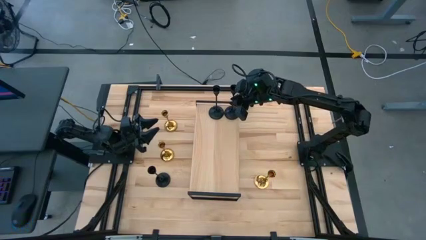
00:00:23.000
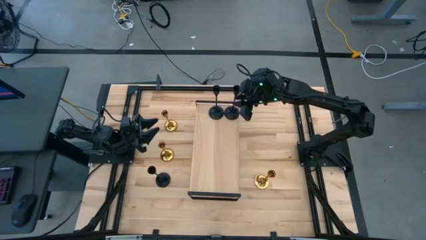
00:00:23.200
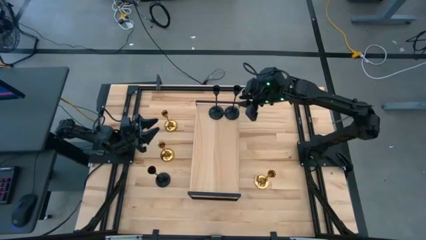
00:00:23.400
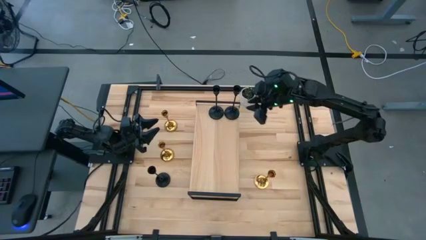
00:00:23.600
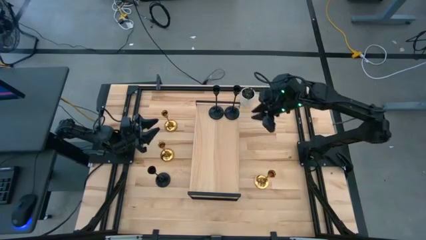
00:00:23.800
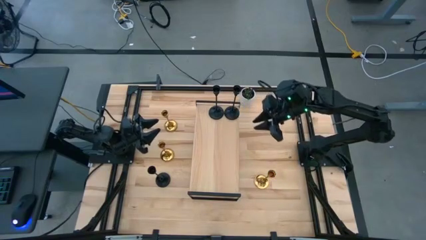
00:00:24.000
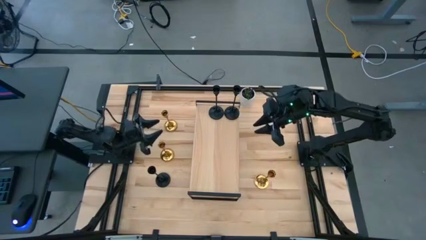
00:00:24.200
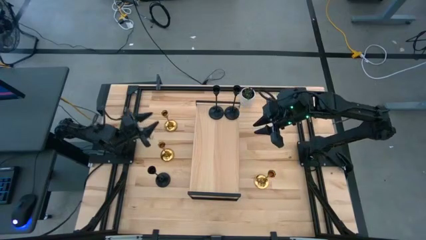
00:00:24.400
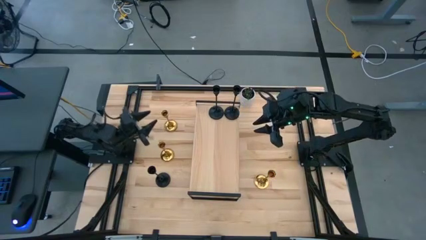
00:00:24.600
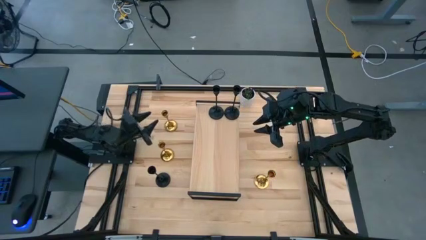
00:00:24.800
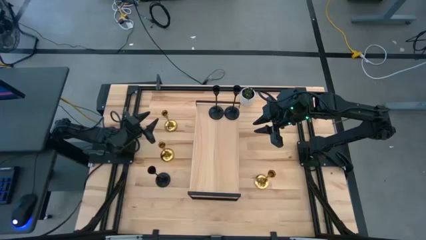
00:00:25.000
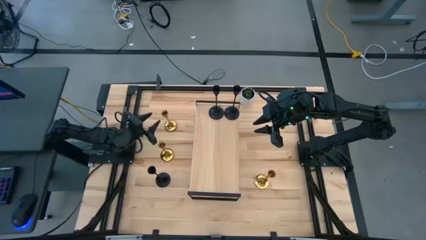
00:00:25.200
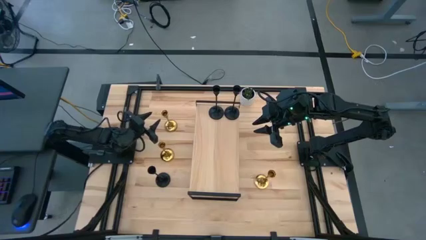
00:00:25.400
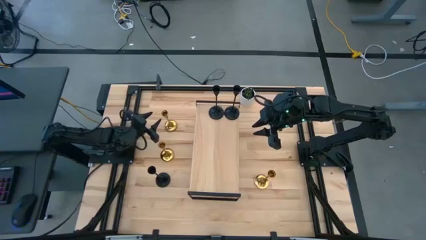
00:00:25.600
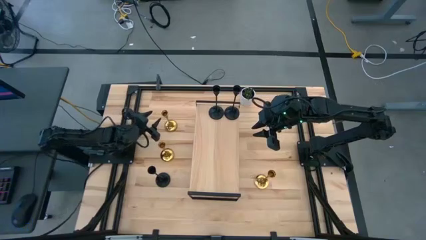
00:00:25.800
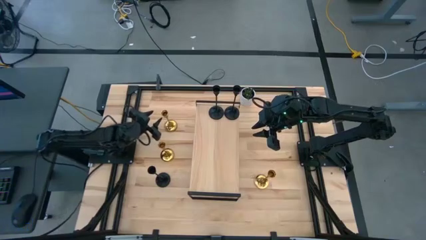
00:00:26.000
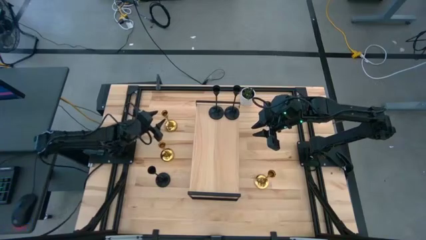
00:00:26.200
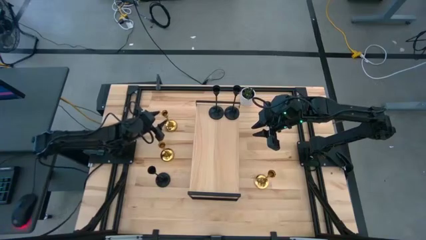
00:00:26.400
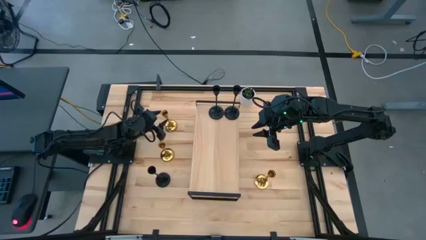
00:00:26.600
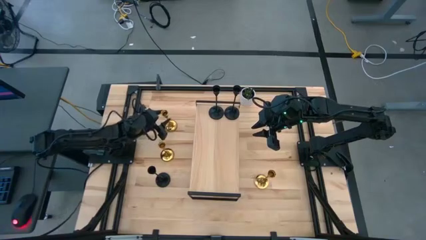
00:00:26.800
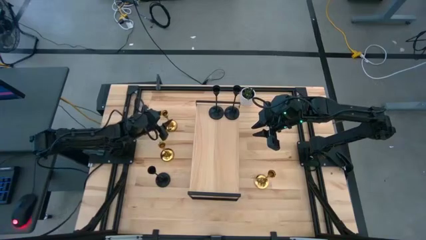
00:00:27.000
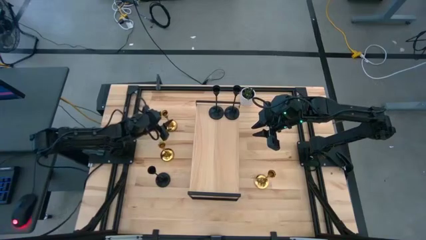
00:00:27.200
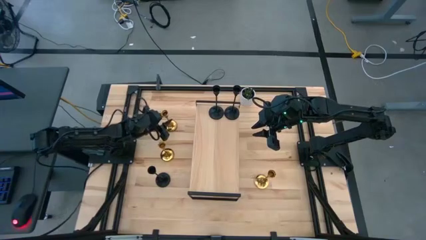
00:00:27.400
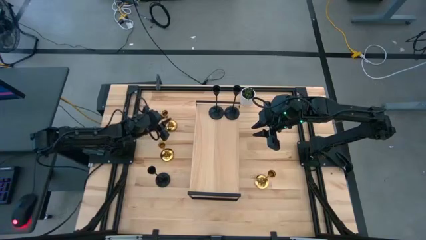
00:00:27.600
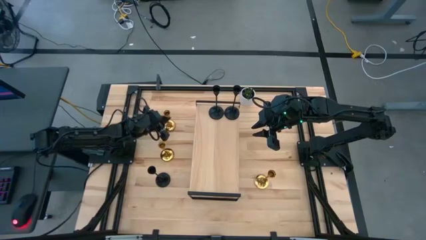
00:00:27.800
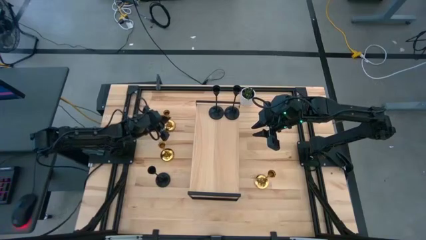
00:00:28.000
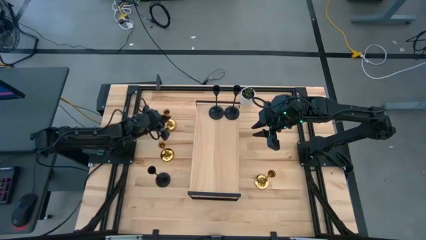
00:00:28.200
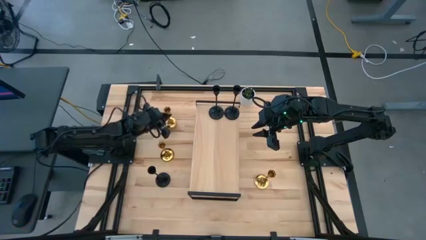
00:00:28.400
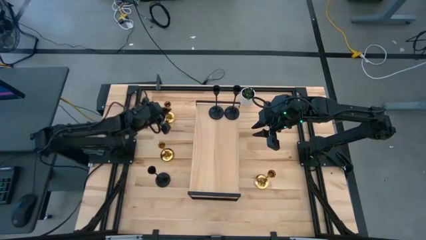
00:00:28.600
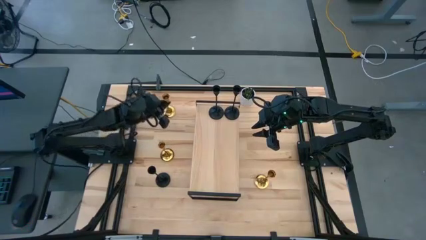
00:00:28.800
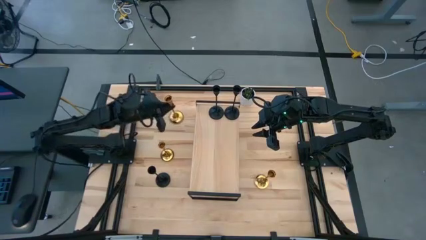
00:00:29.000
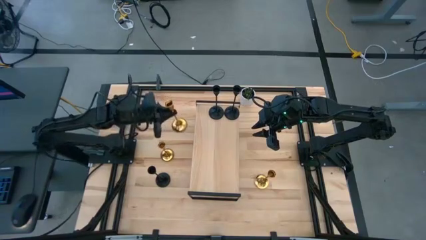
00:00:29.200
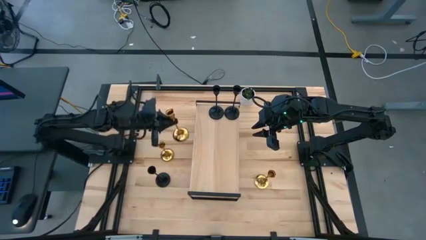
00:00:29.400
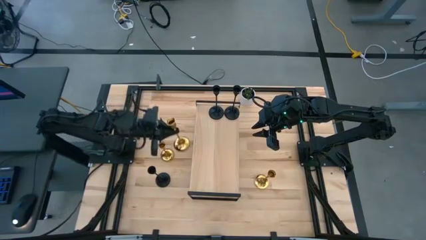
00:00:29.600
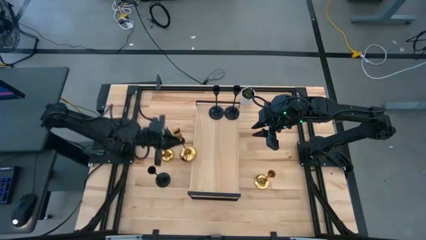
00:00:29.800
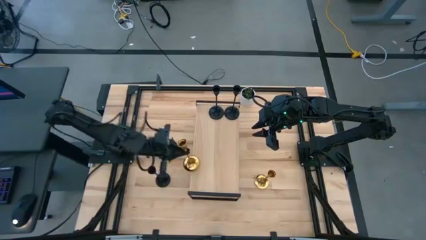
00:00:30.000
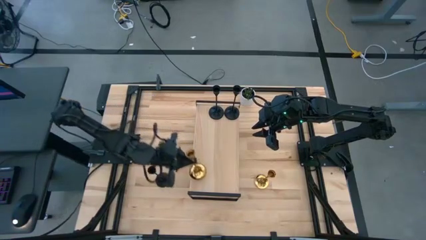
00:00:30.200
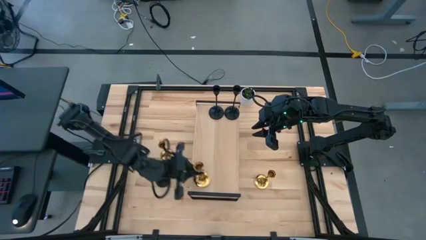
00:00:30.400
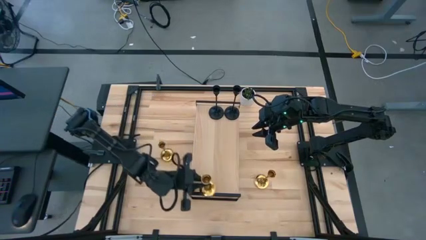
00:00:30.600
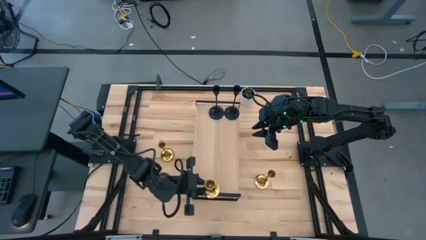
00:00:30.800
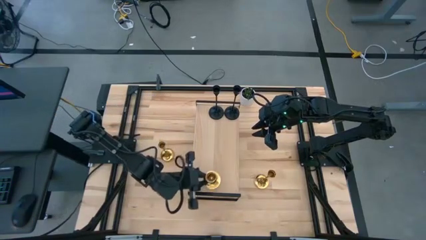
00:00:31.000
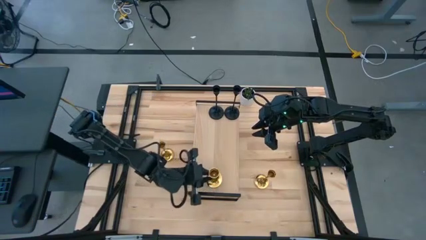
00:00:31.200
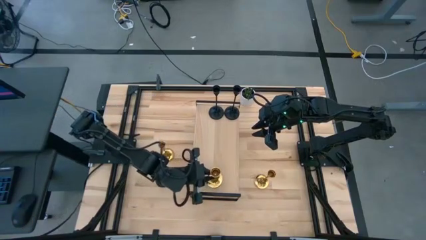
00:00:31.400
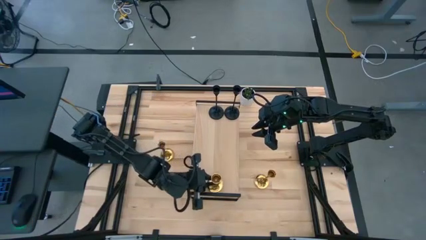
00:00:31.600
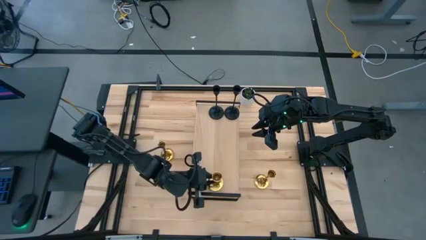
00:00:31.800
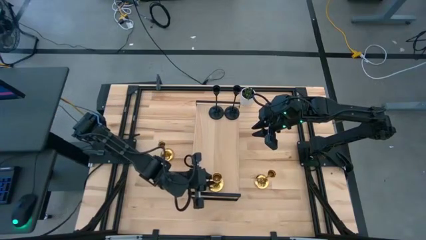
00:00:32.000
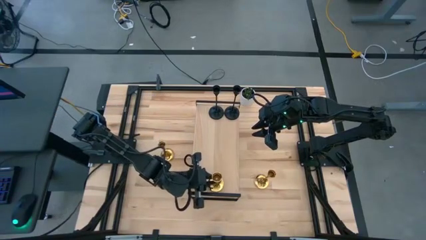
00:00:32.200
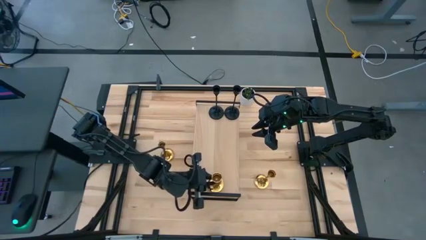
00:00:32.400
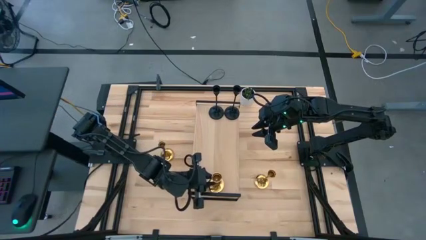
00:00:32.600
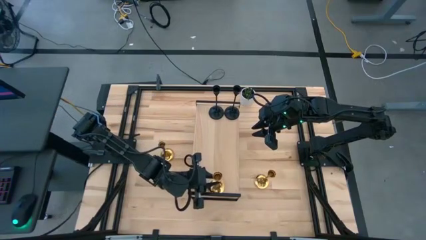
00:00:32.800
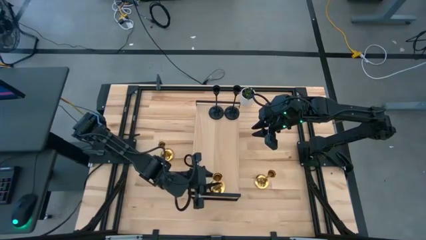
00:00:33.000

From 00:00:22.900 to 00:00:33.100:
Task: Pick & Place candle stick holders
Put the top left golden candle holder on the shelf

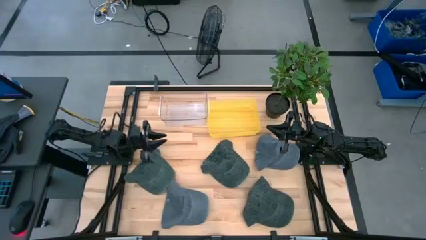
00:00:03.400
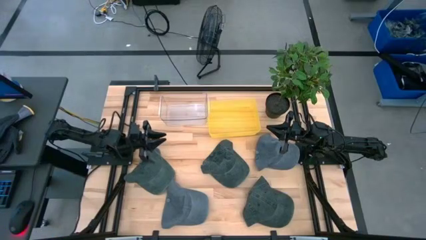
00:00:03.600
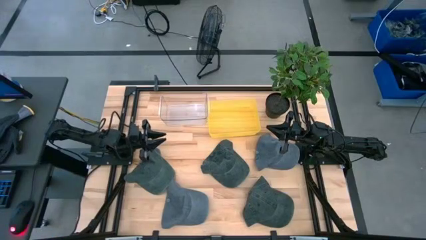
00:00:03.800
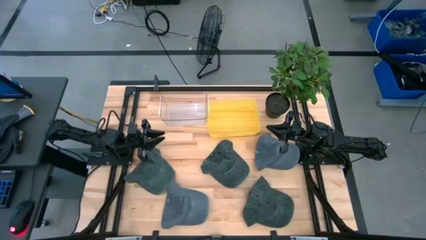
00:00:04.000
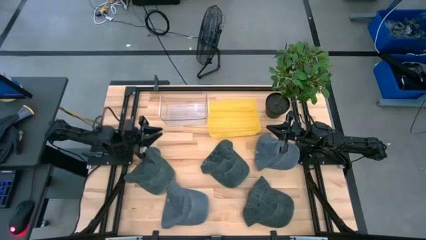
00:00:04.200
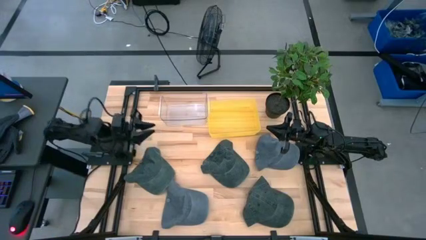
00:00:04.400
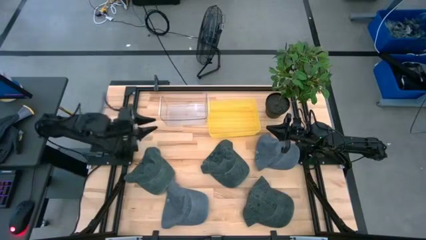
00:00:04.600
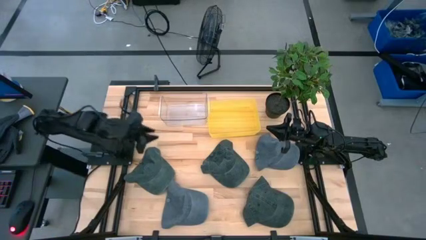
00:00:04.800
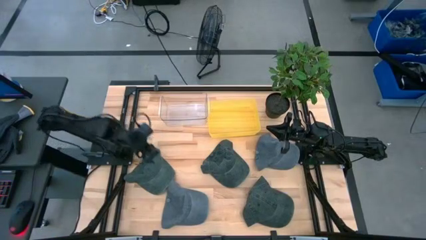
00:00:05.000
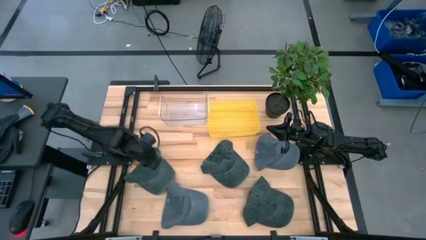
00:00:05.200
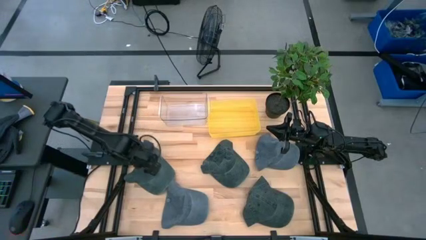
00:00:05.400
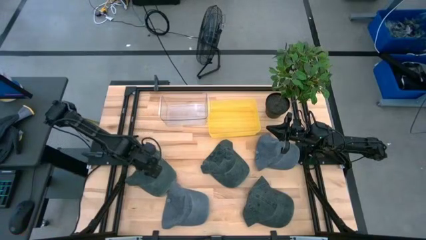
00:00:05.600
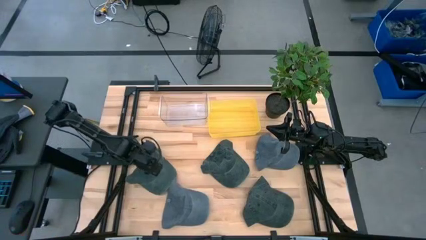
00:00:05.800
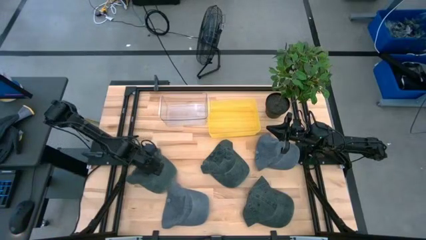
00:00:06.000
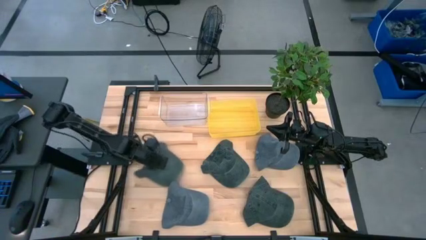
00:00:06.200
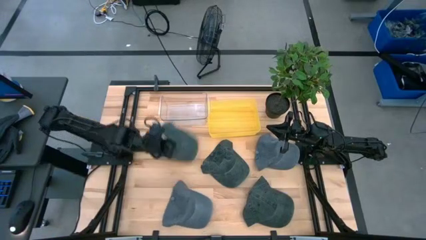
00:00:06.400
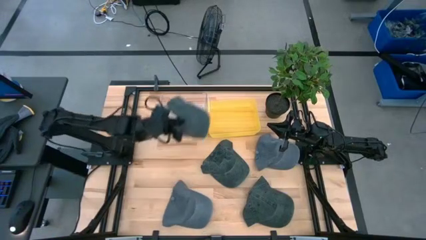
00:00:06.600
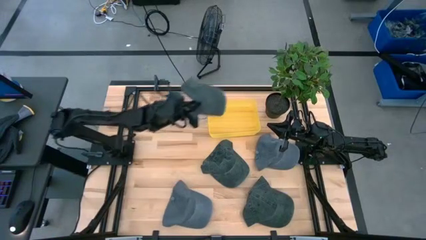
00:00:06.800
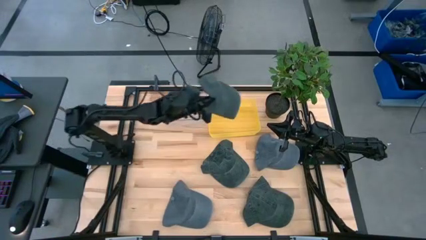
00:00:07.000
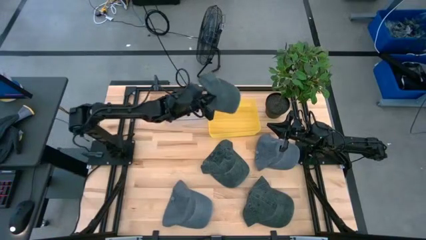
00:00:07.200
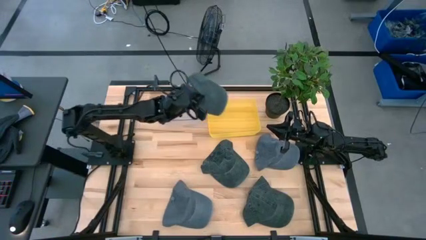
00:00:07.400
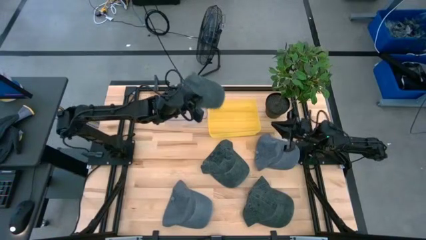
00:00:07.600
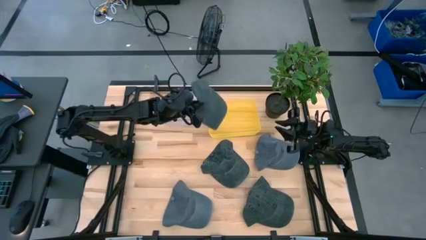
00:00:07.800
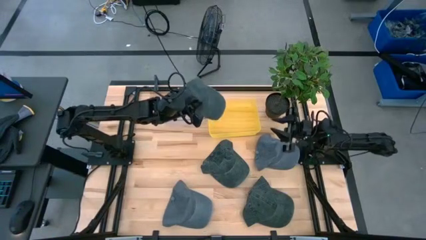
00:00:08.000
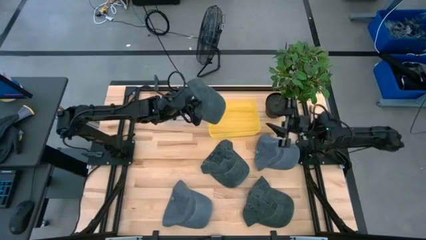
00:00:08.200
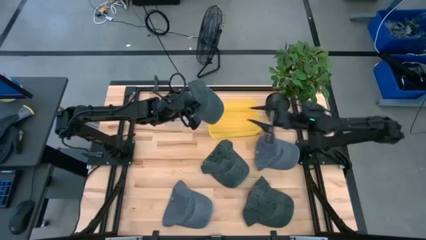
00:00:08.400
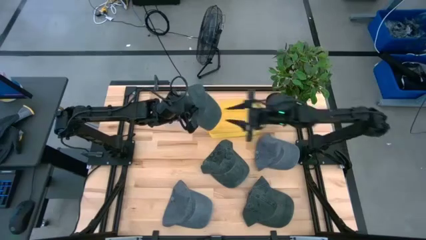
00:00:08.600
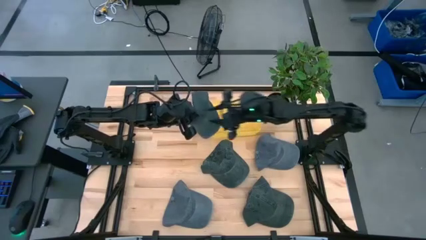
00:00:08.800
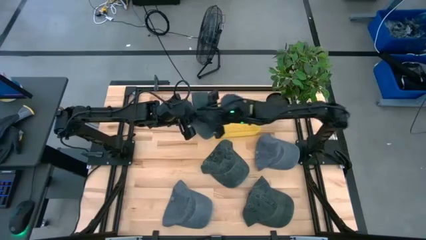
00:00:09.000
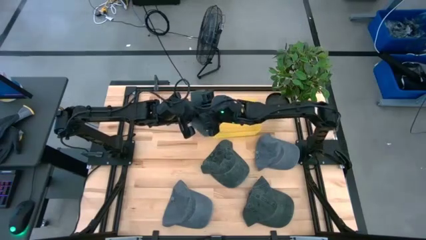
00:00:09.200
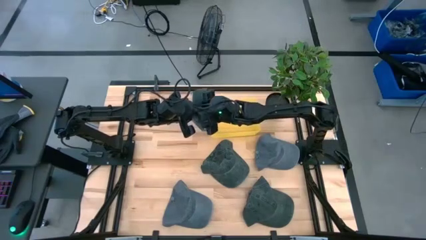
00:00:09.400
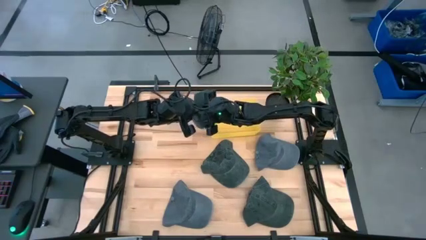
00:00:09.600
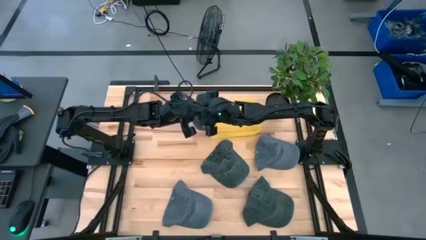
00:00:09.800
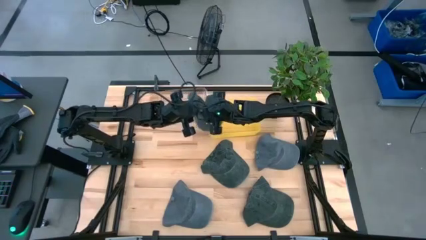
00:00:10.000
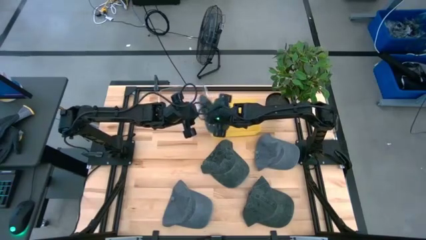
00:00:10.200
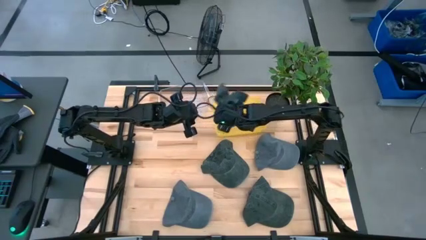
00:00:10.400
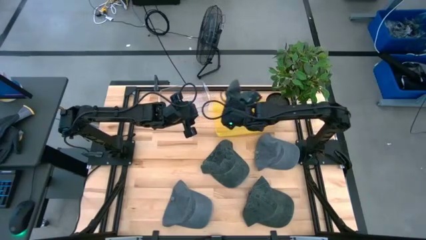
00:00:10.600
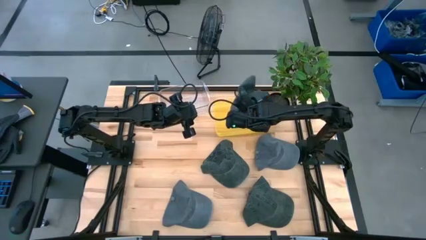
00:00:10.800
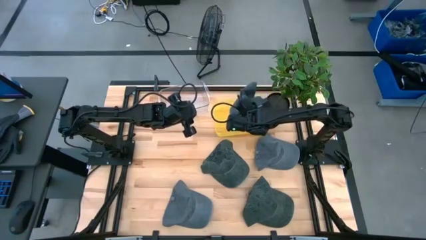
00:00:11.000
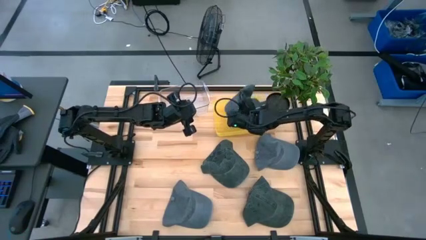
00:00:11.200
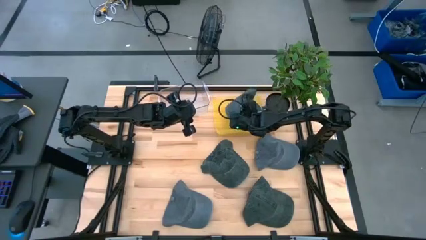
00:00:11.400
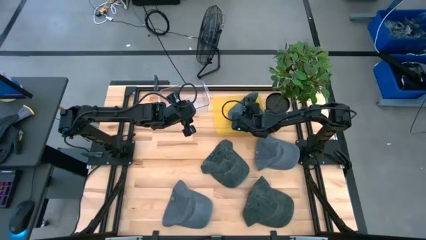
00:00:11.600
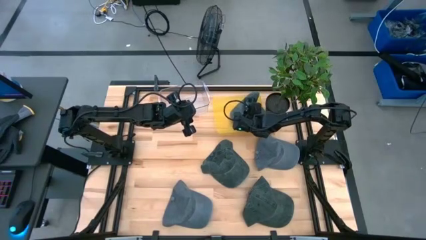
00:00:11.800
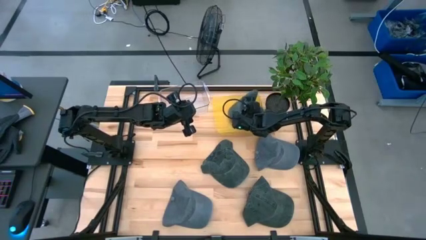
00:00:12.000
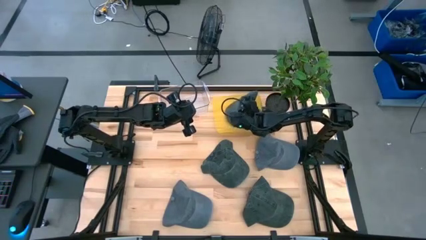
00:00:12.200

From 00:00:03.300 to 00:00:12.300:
Task: Pick & Place hat
Put the top left black cap into the yellow bin
